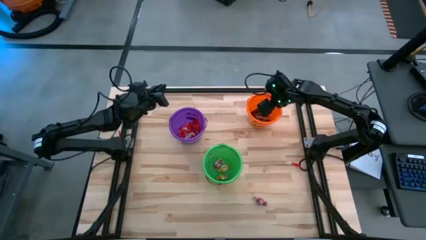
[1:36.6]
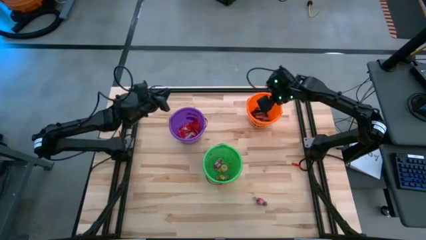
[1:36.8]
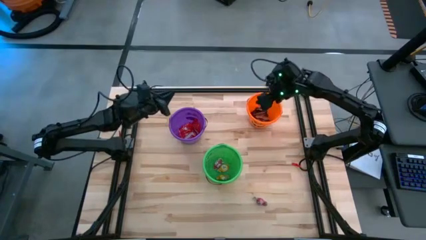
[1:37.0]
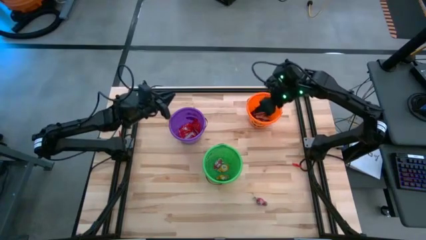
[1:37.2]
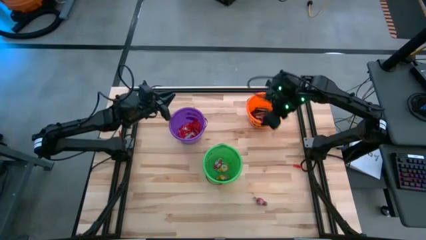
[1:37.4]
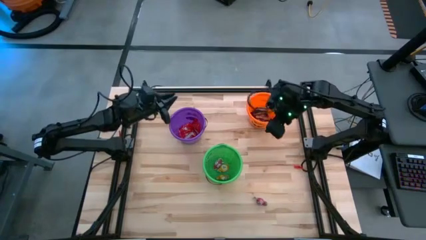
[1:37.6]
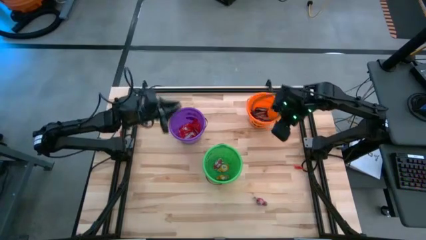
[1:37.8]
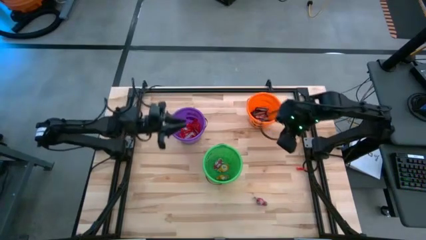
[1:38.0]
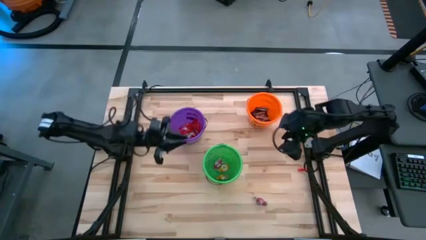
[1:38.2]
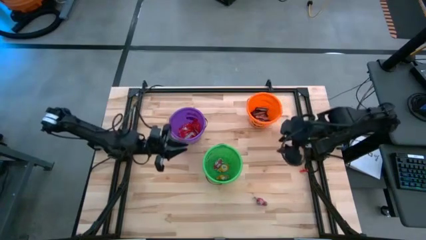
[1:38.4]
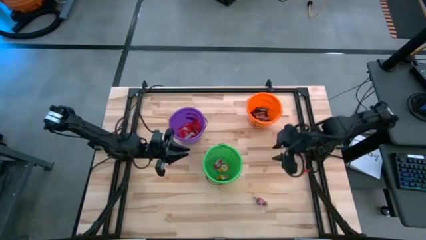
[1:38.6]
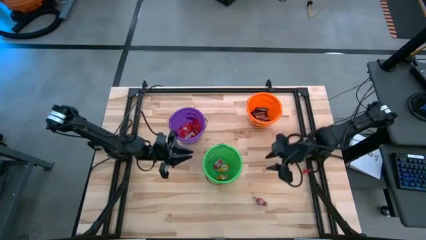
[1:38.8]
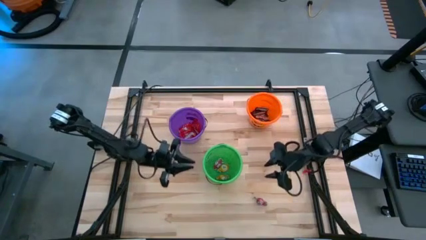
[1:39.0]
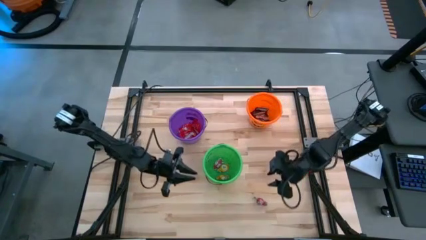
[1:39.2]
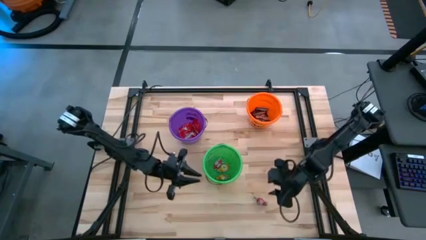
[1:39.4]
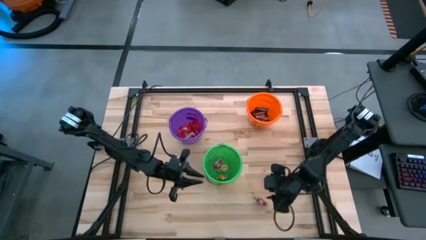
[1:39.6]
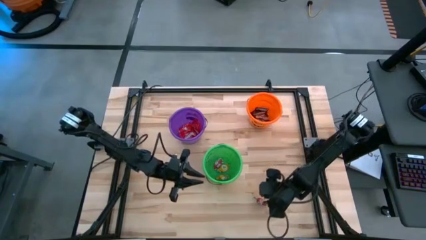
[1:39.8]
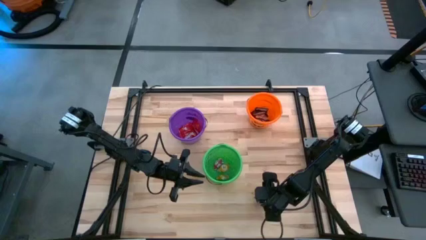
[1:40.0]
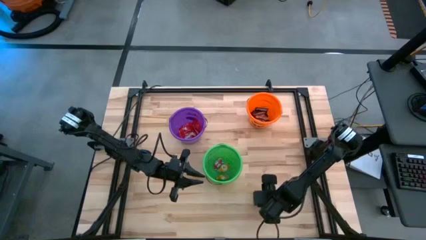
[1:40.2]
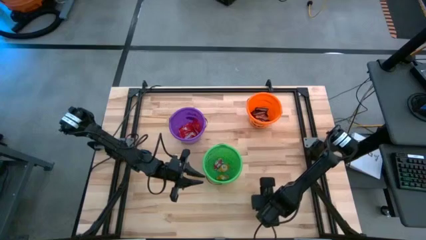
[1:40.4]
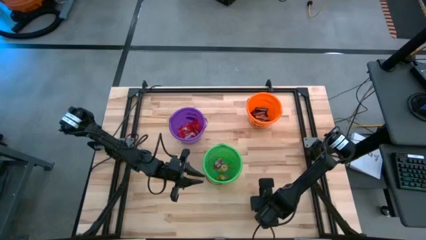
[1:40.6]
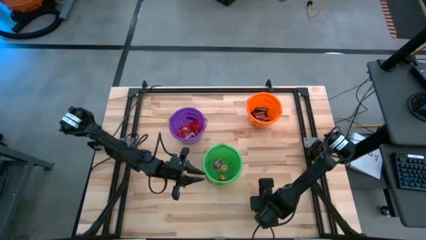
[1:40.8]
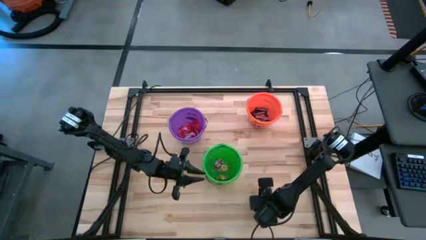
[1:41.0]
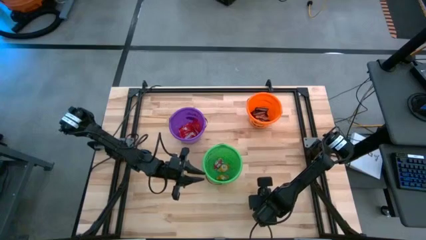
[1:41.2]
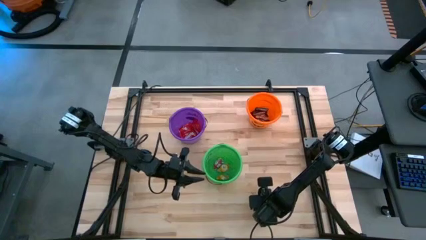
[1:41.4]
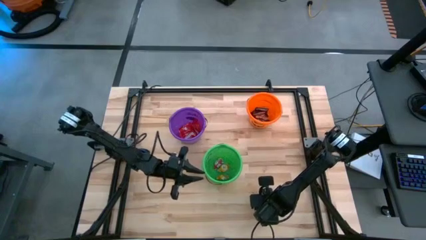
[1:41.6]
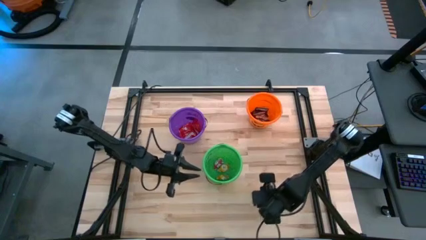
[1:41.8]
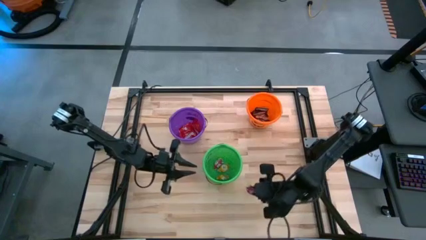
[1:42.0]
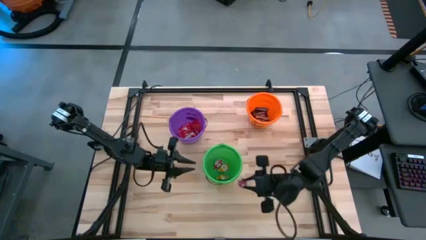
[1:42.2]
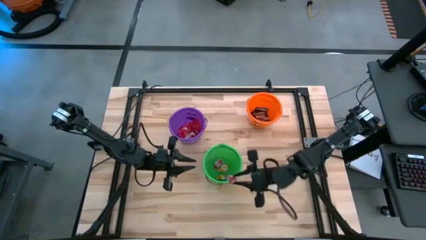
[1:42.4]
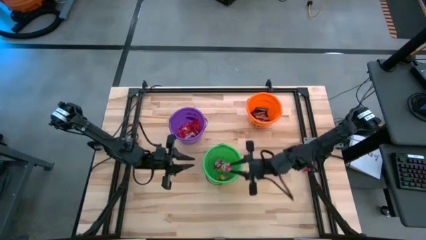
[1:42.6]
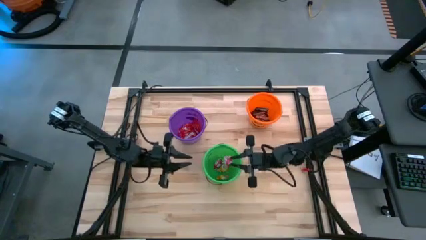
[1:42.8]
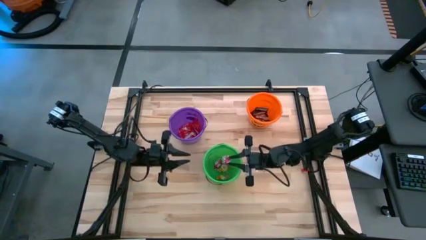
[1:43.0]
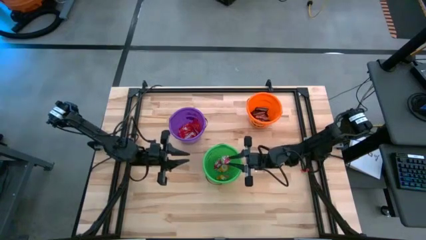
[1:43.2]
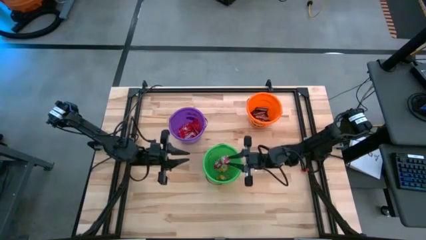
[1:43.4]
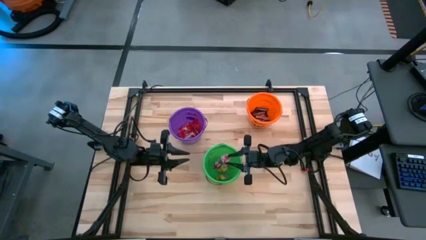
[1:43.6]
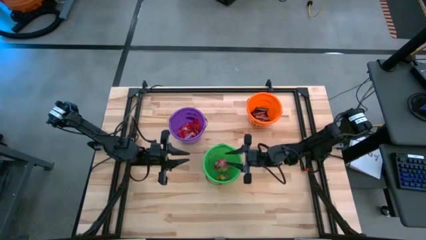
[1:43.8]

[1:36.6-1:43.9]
Task: Organize candy in baskets
Put the pink candy into the green bucket

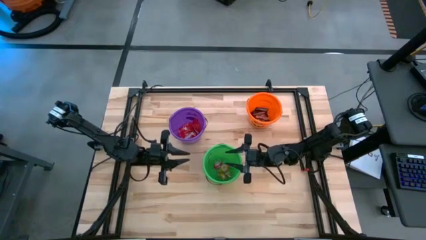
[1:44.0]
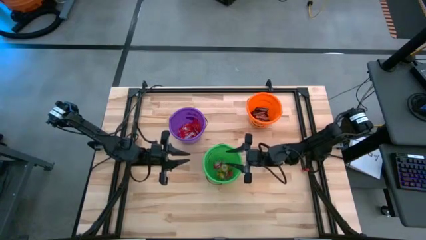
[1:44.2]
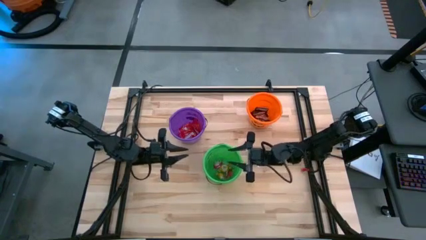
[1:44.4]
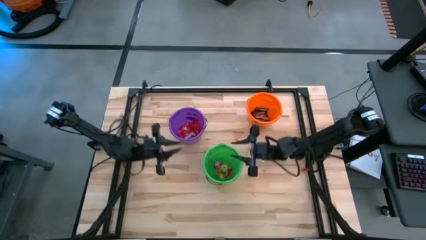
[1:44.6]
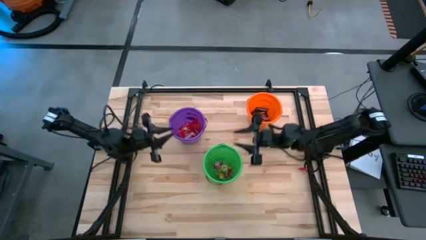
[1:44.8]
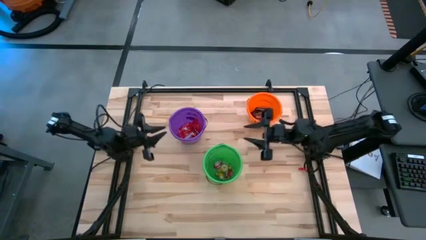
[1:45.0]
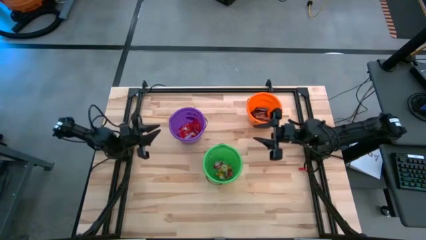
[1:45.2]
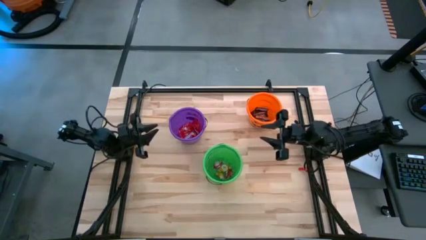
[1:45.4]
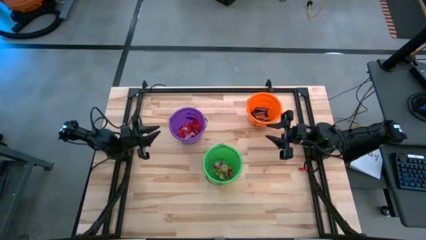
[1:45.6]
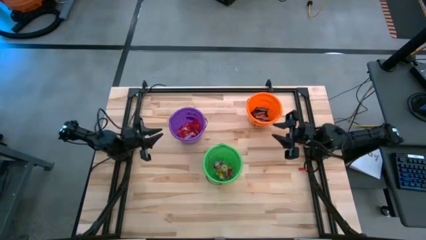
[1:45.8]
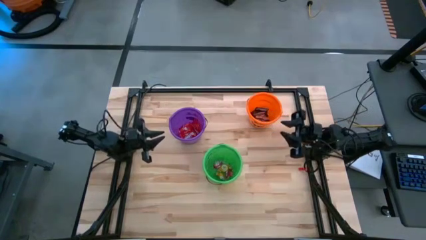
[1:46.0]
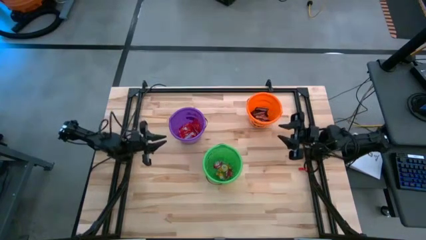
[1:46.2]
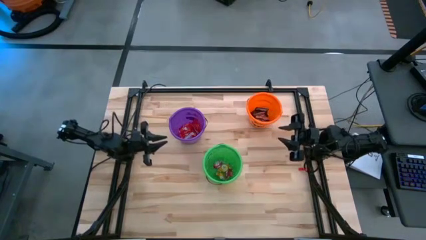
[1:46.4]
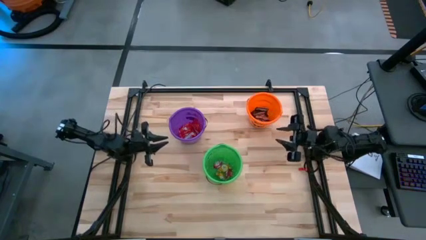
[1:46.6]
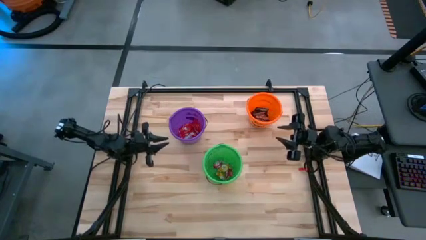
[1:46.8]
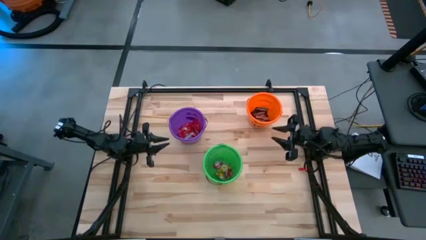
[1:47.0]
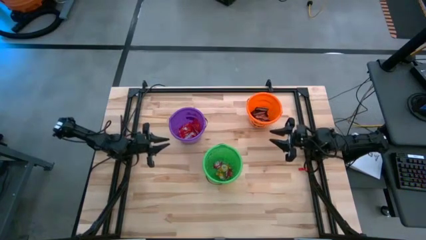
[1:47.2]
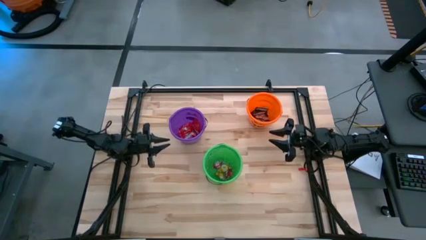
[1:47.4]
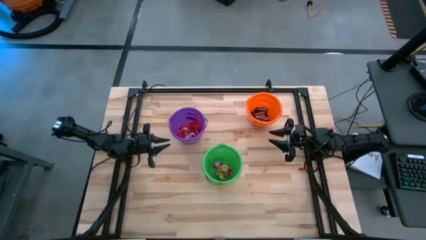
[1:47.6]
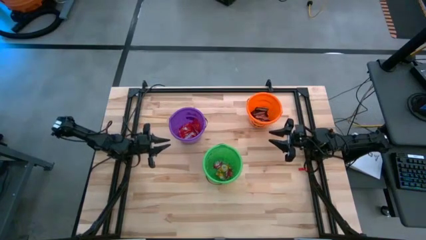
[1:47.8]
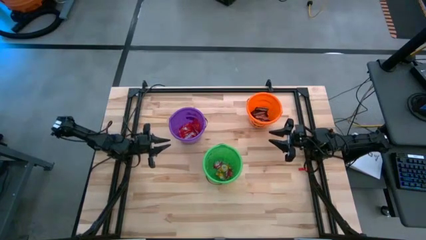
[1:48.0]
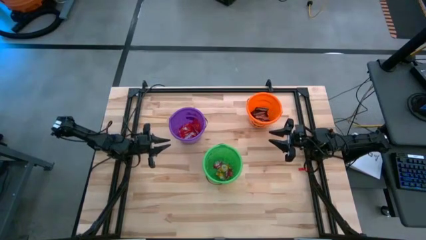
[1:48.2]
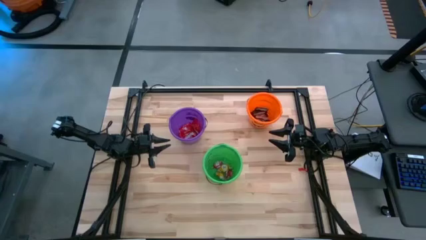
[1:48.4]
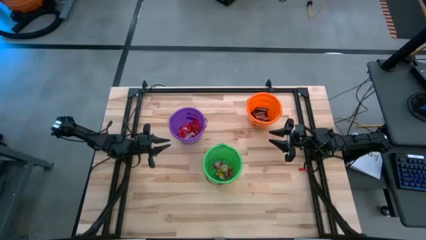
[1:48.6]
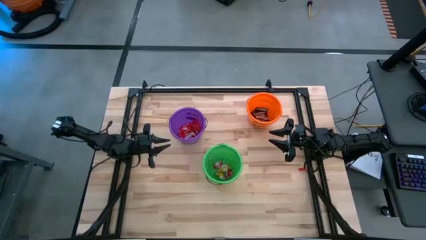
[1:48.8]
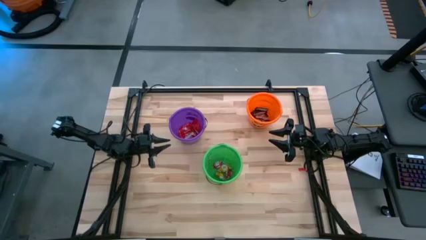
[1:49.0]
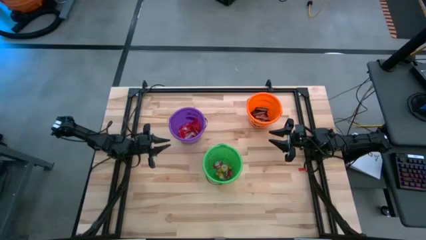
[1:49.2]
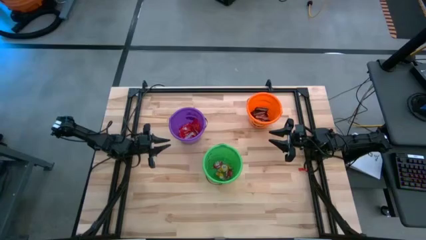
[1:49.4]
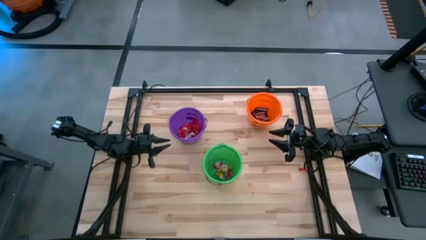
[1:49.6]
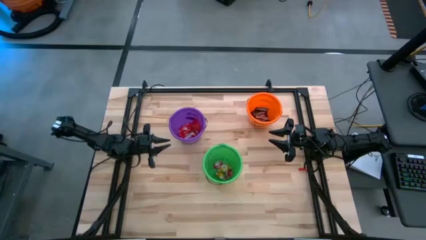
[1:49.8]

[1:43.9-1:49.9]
Return to Home Position

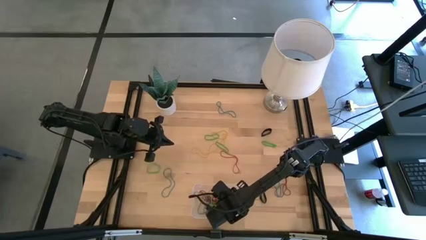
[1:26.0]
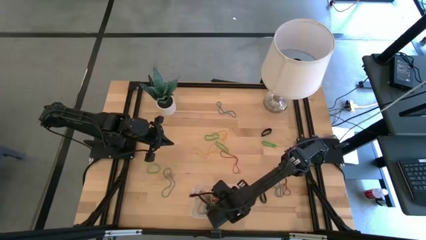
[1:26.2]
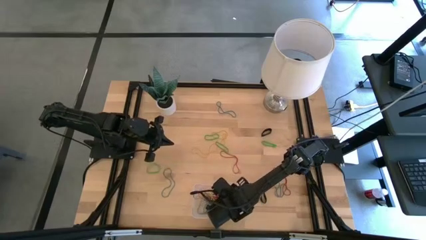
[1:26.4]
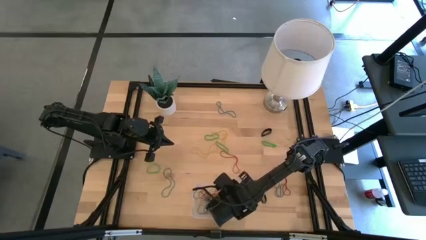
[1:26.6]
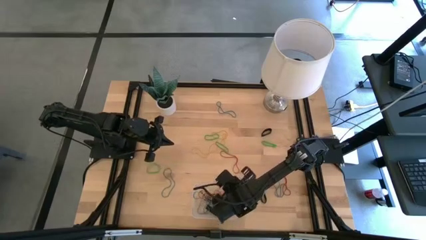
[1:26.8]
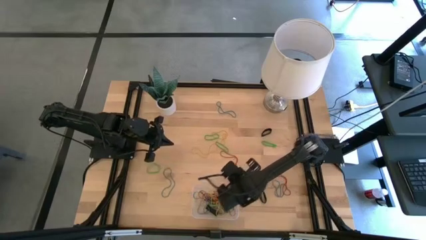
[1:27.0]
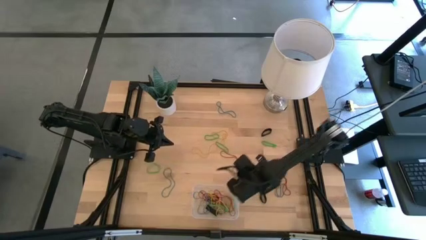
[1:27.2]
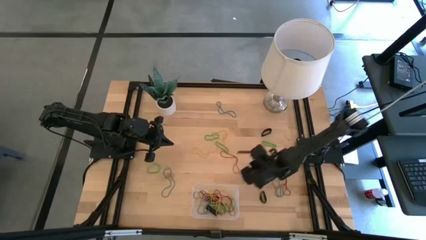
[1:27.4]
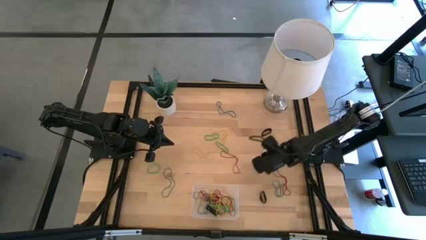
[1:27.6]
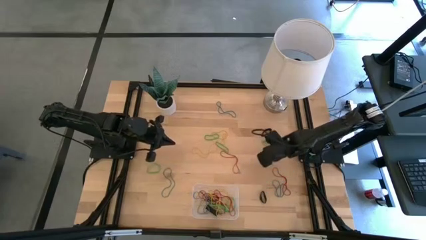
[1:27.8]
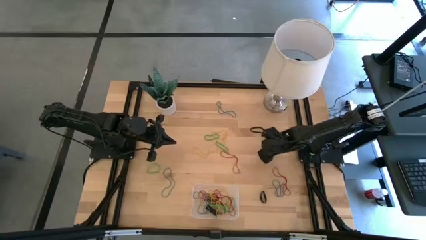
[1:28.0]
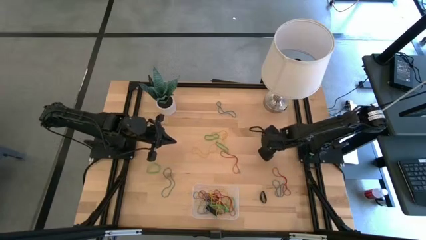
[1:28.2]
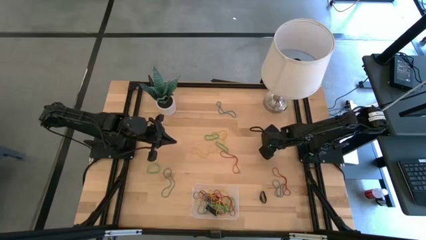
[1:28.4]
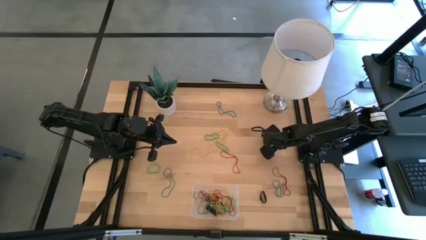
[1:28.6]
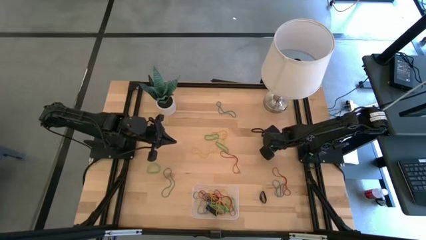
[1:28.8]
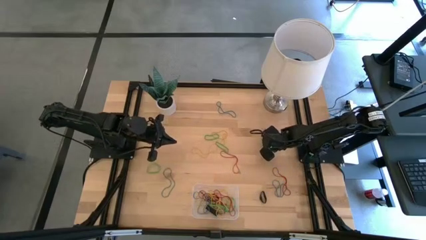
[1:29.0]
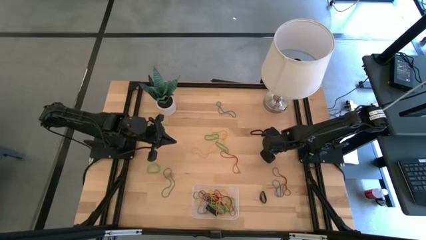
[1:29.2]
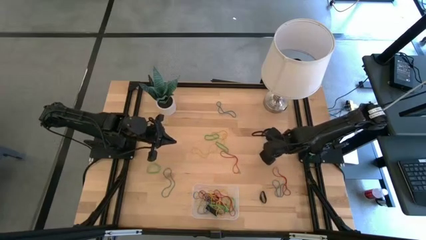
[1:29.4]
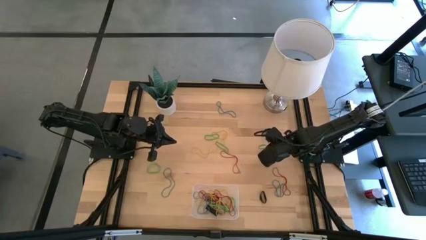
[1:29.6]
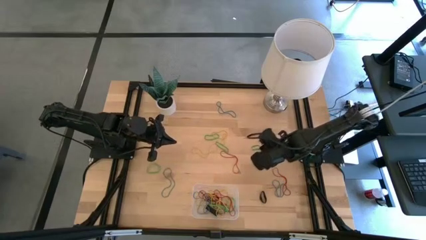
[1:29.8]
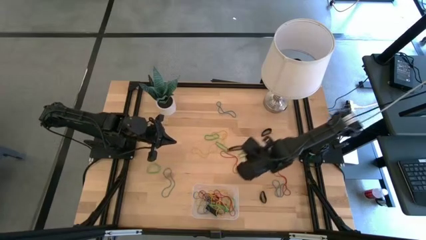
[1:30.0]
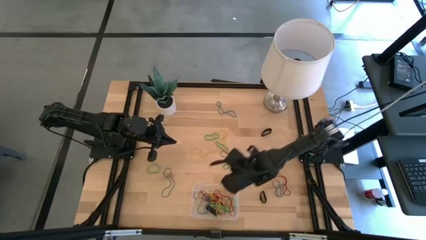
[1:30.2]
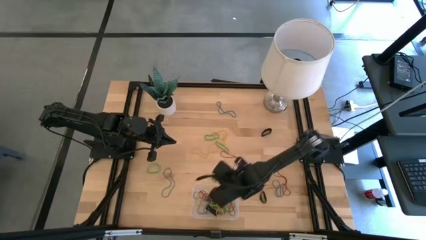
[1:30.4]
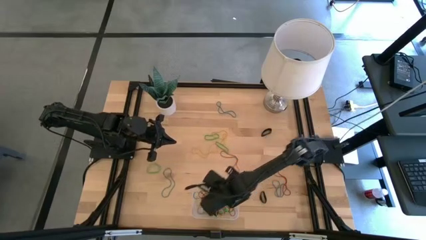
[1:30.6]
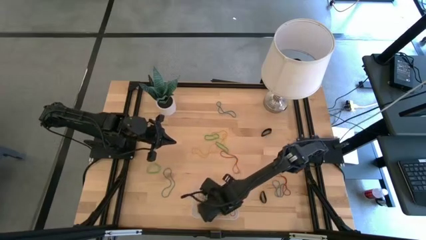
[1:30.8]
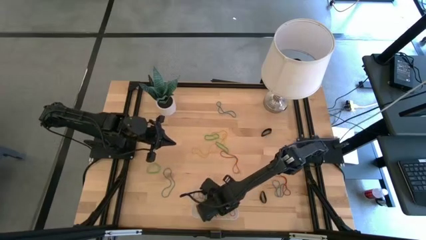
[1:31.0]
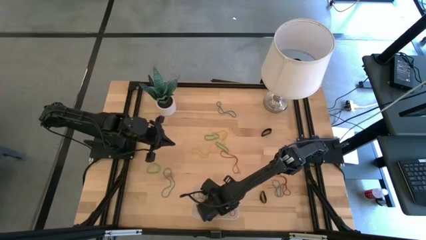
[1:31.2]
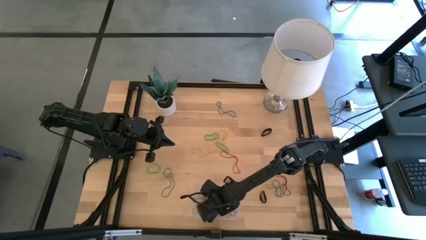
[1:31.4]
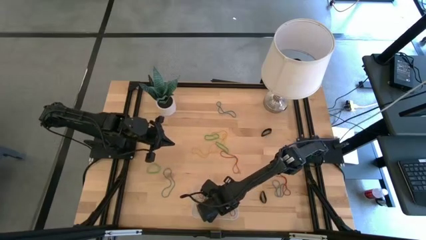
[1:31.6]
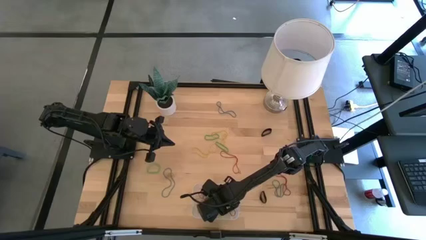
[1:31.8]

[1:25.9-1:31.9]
Task: Pick and place rubber bands into bin
Put the green rubber band into the transparent bin
